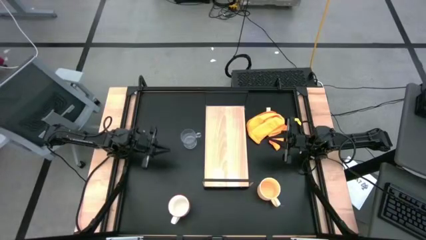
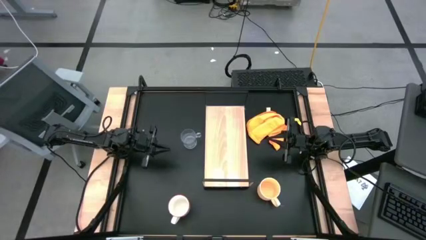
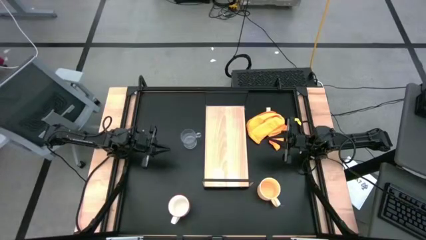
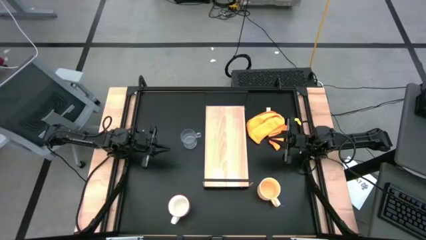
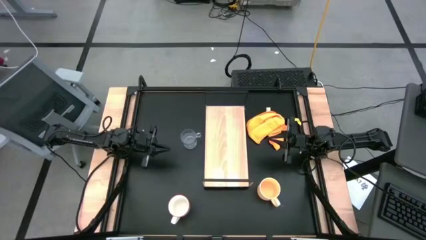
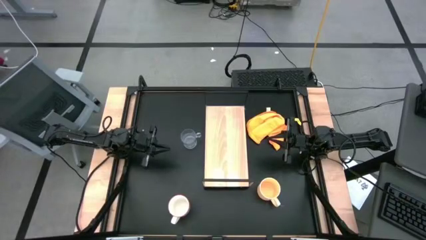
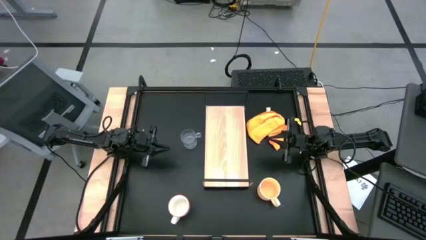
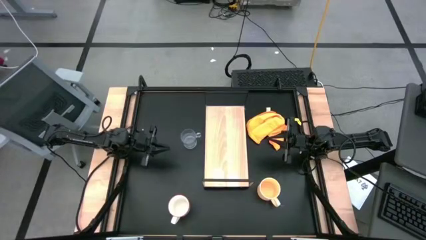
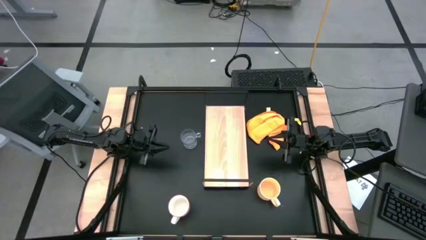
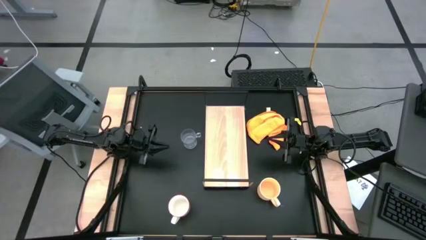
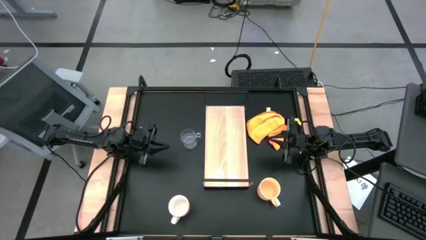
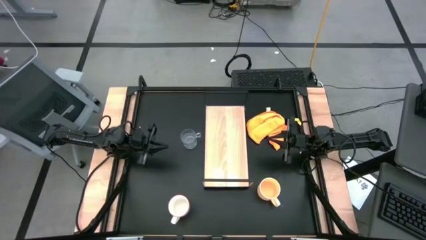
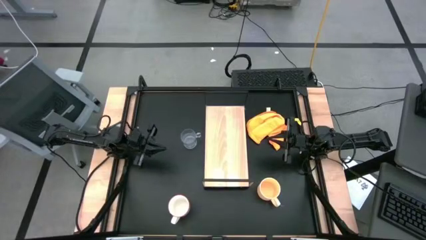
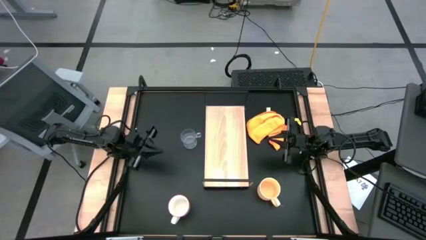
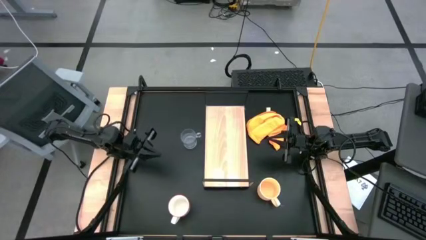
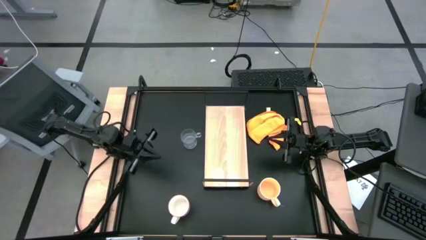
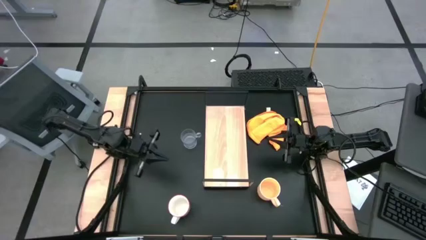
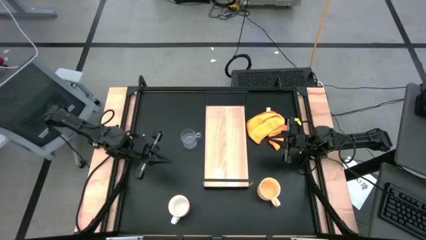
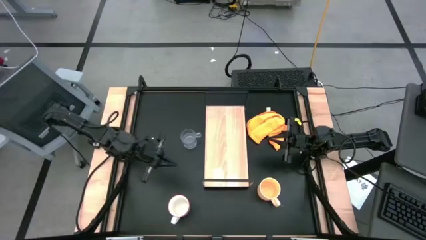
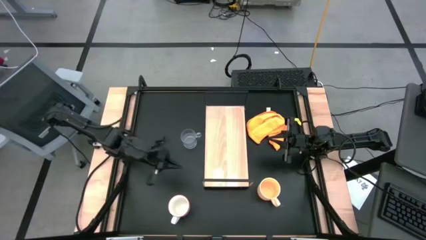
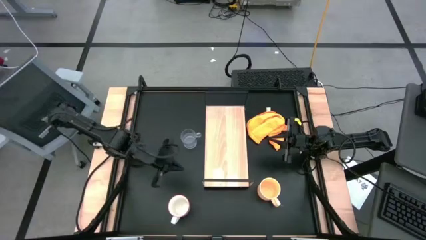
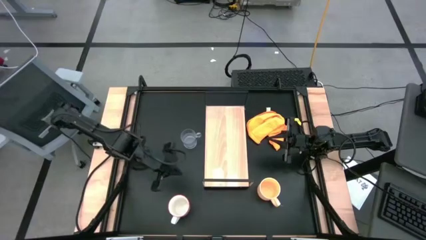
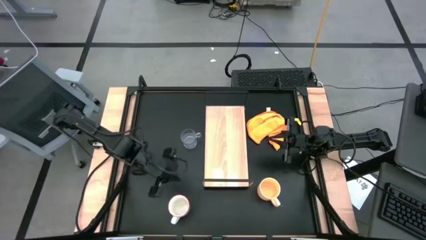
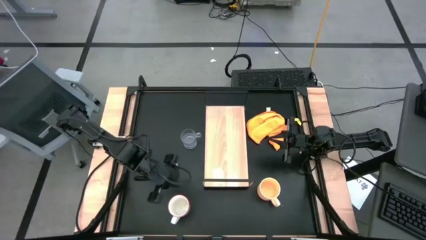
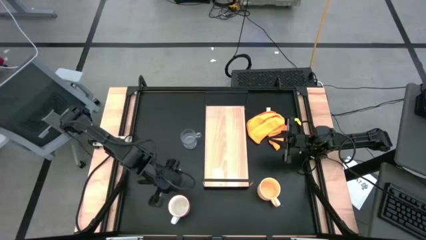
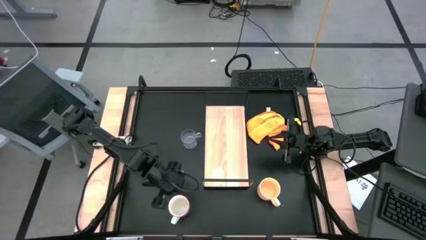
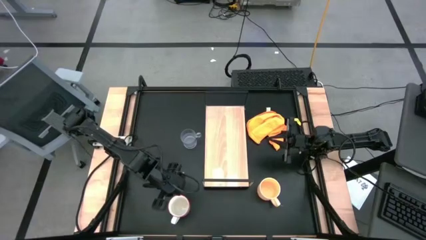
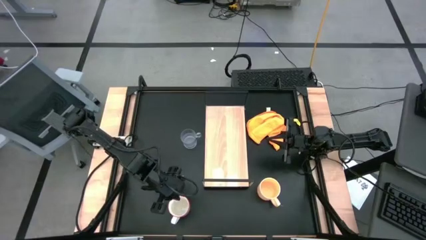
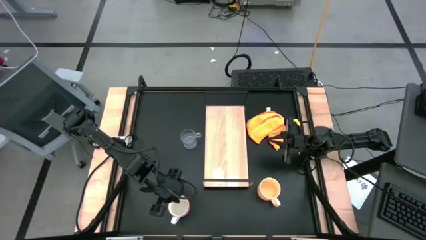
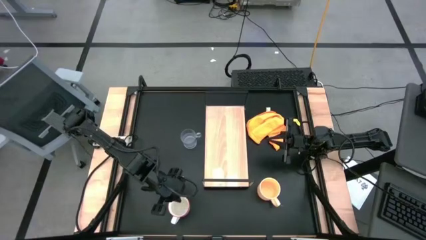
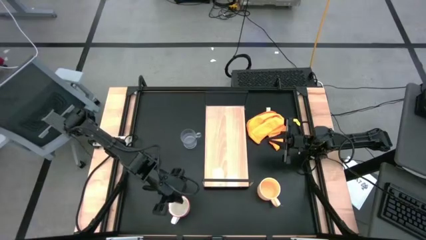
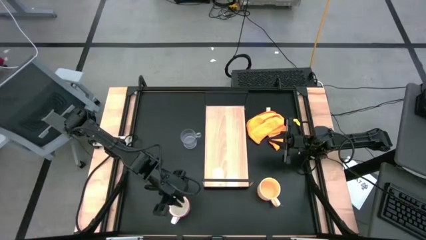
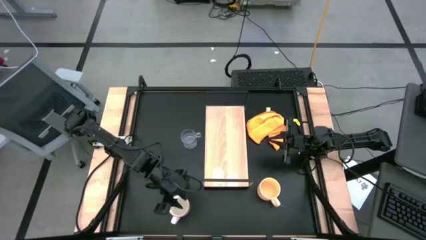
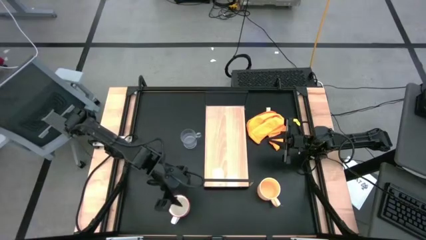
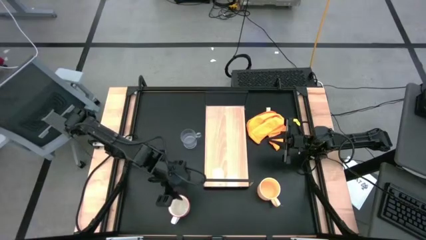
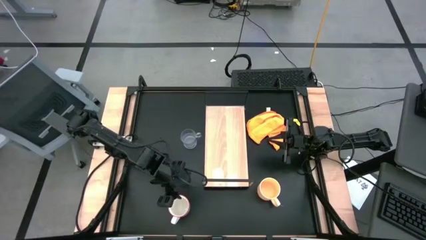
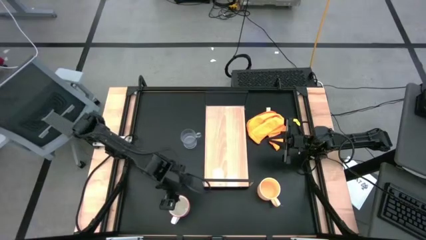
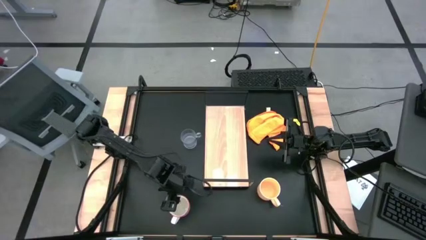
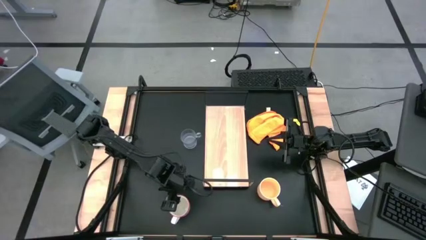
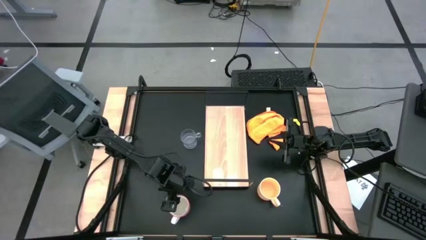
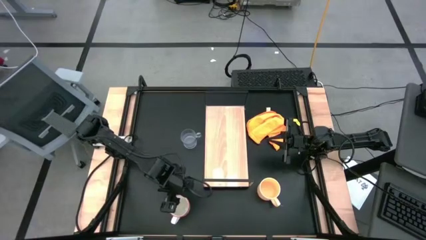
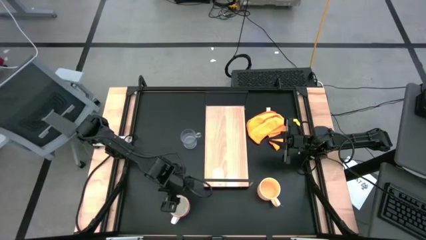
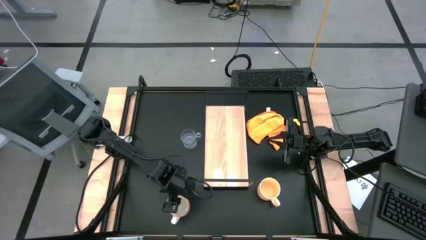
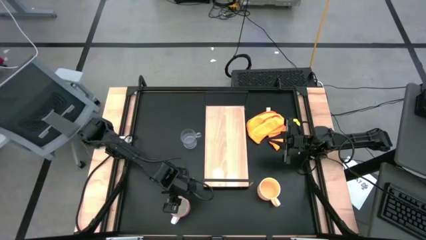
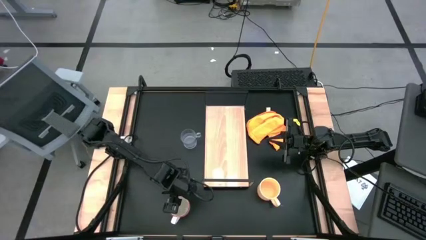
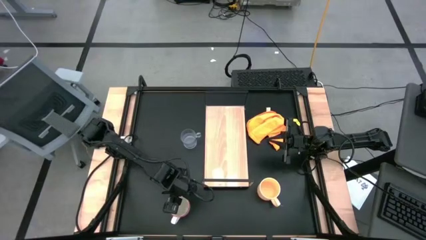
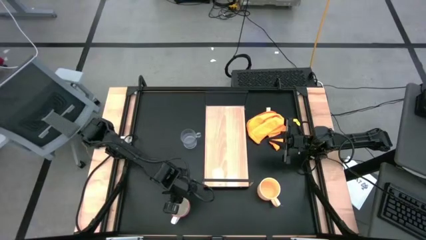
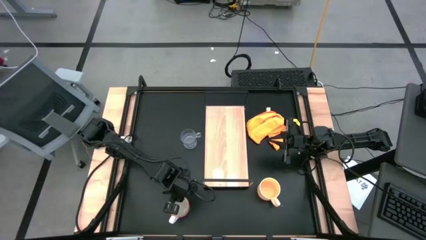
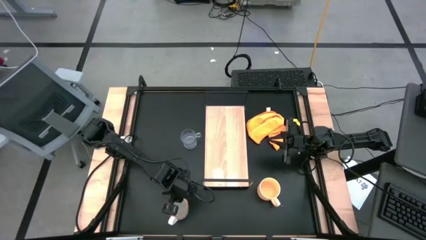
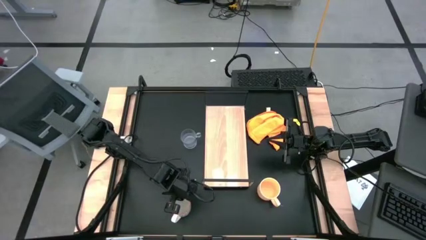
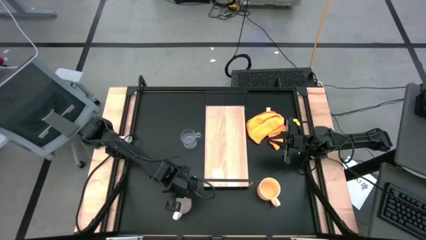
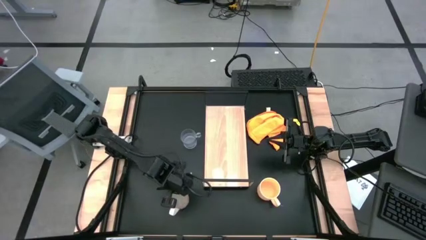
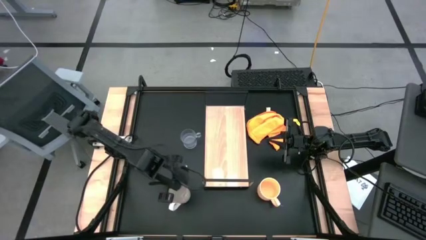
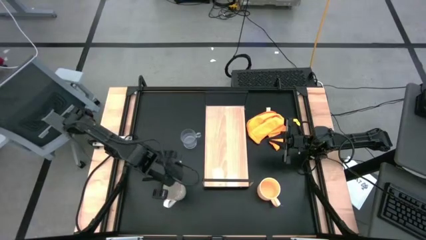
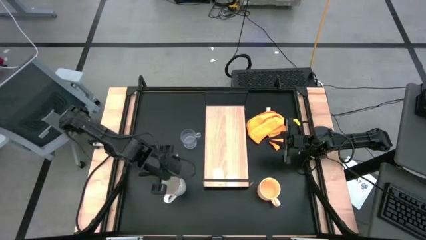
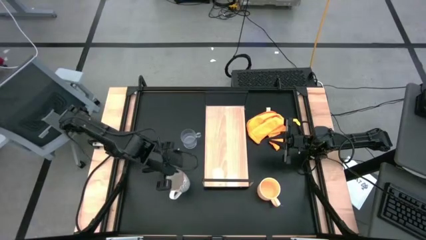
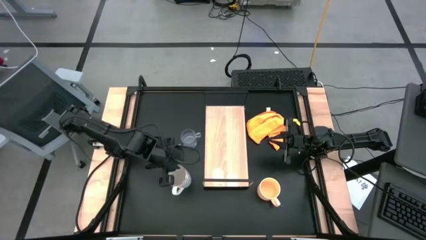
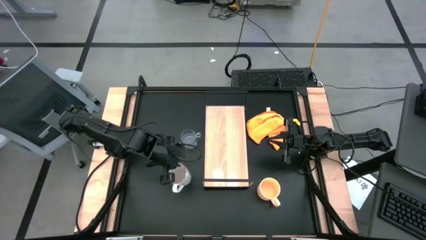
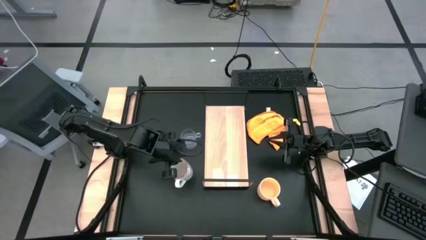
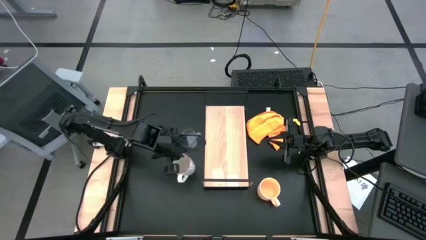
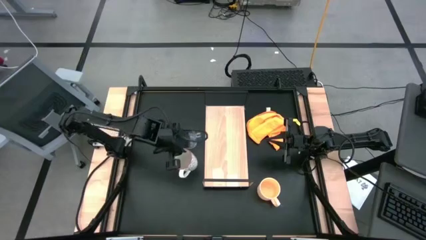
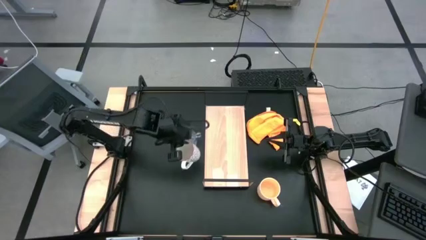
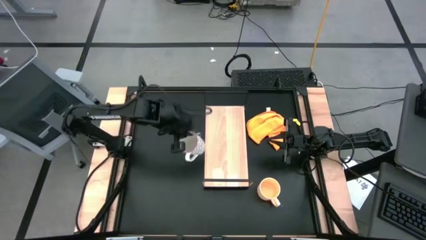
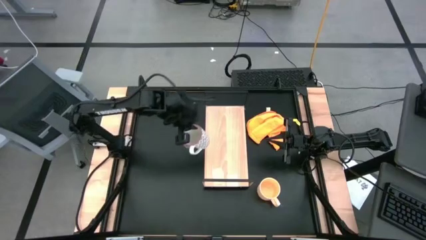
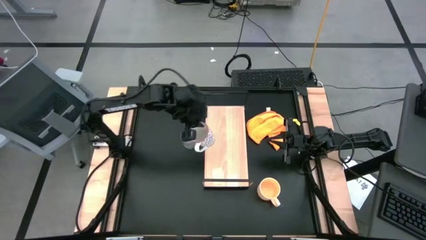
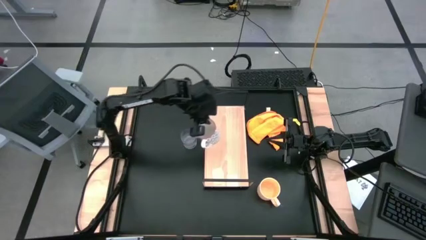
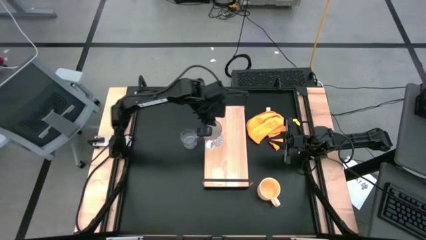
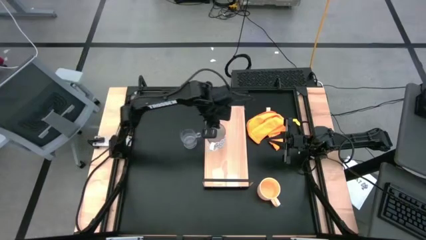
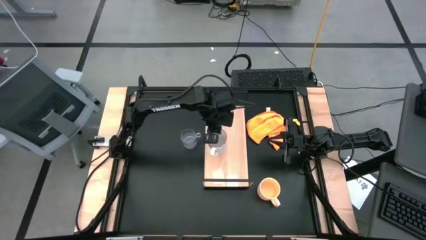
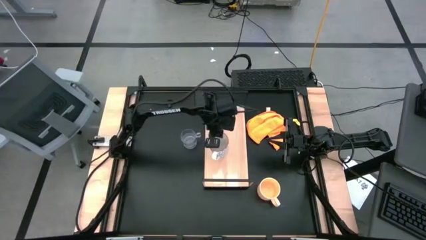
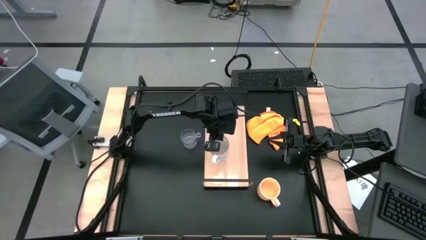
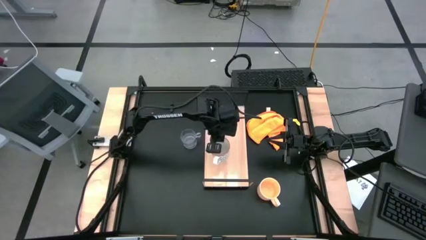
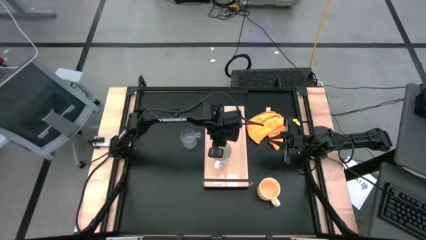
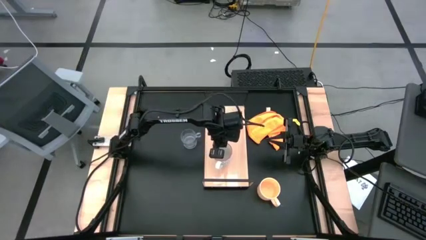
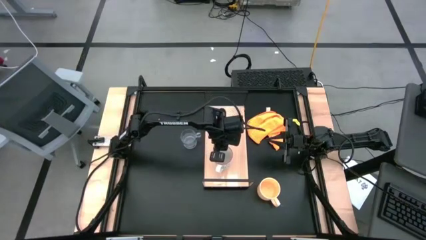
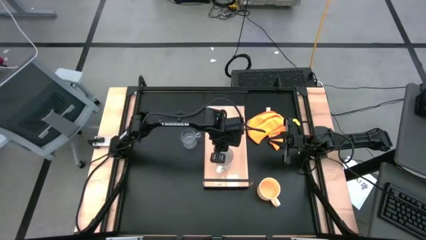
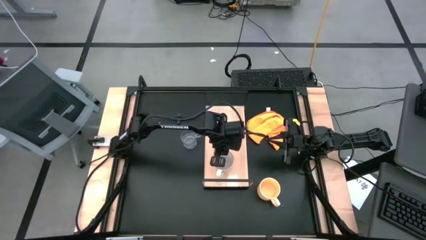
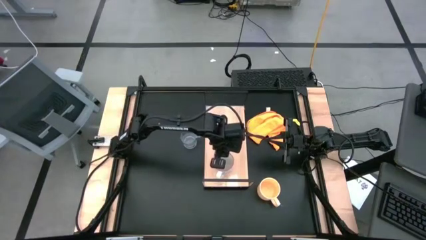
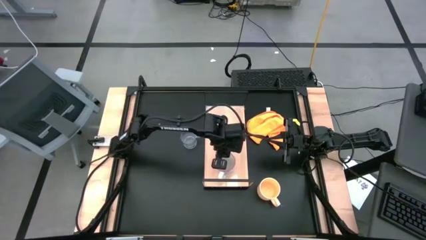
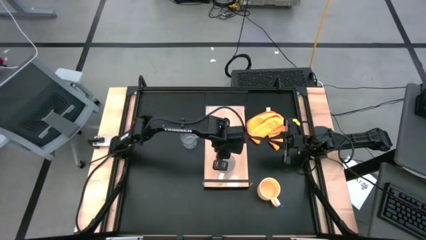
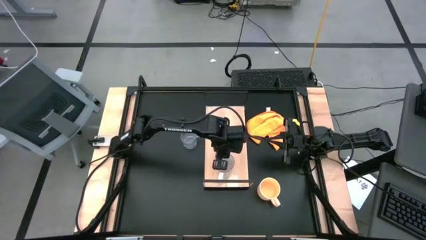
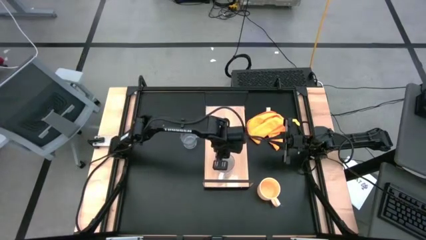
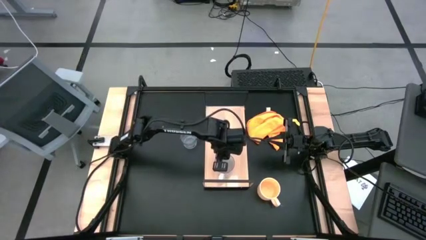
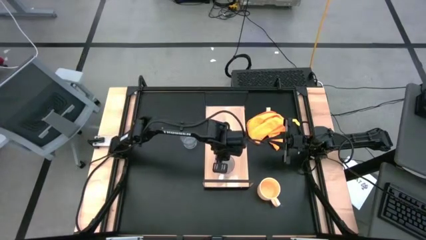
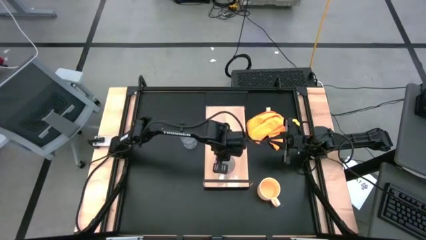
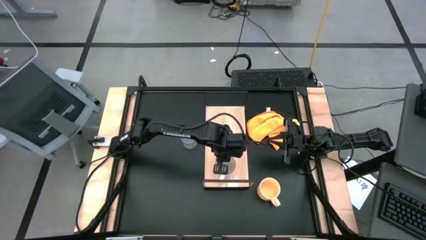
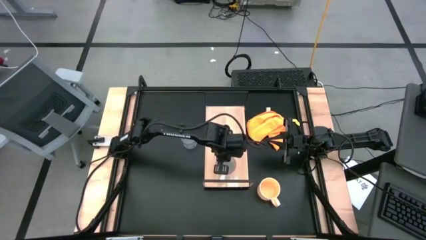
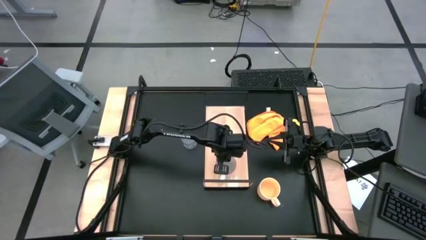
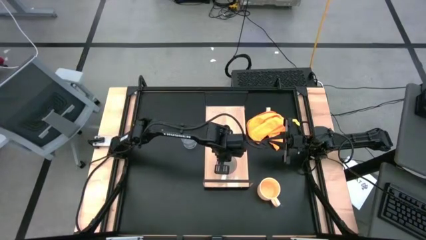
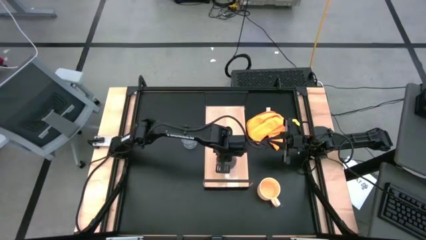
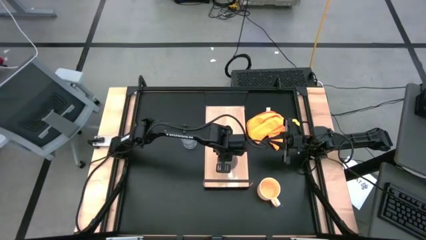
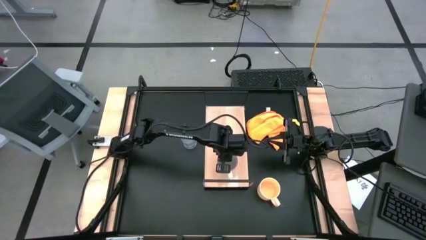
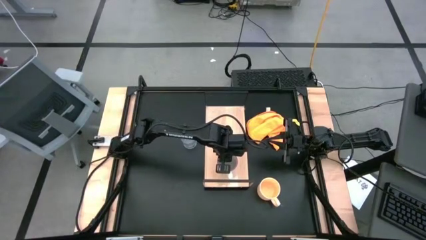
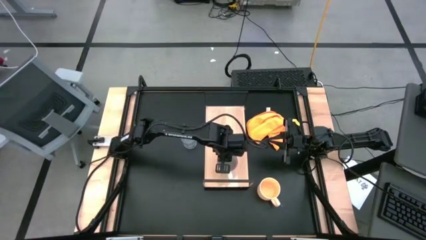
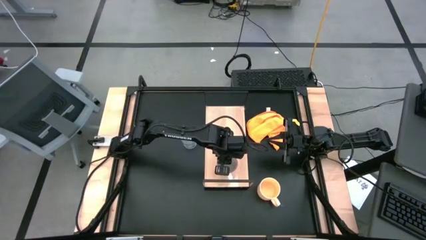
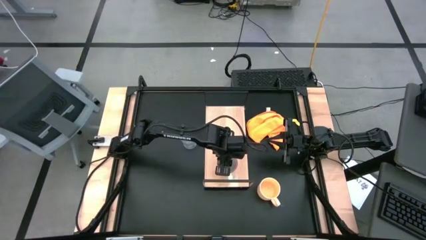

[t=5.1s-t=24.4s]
Task: Stack small to large cups/mugs on shelf
Put the gray cup on the shelf
